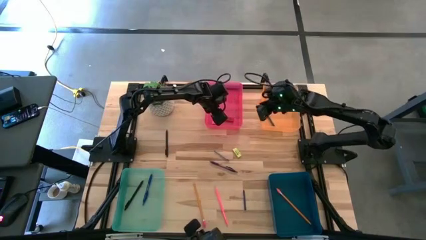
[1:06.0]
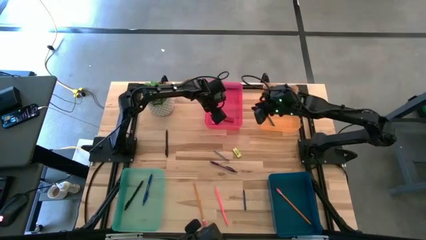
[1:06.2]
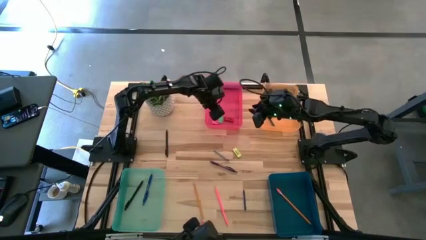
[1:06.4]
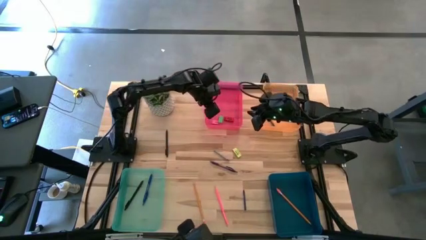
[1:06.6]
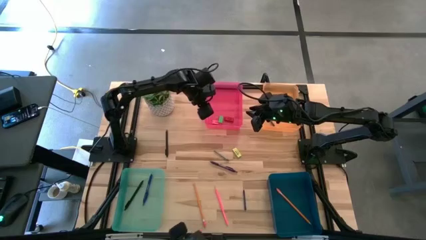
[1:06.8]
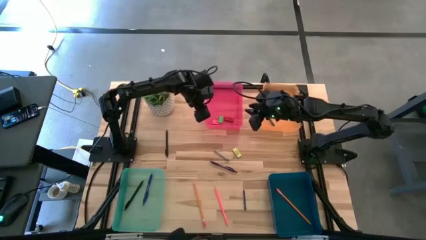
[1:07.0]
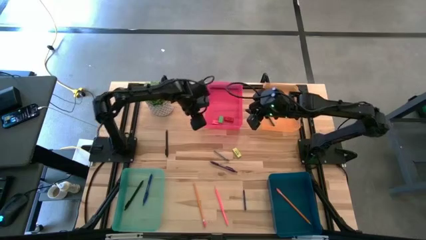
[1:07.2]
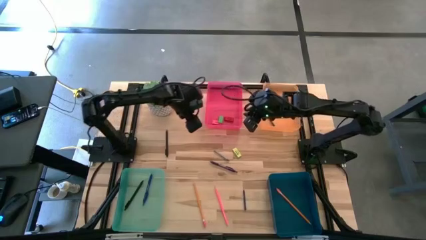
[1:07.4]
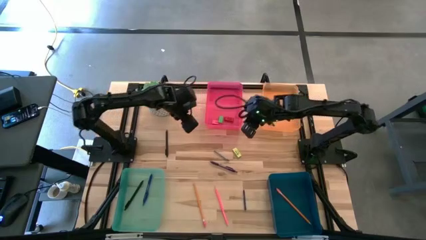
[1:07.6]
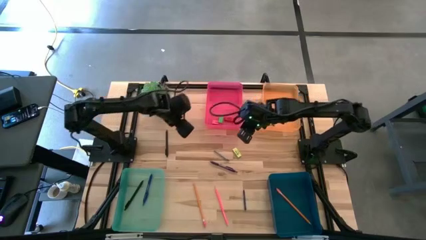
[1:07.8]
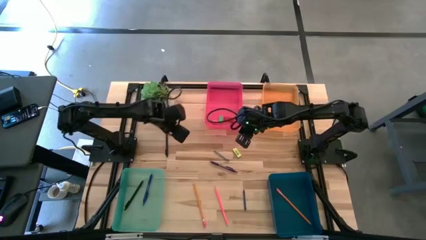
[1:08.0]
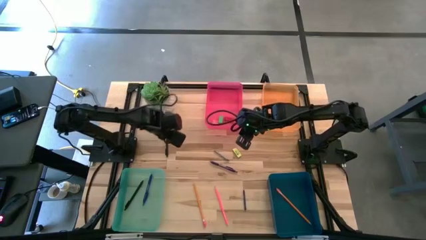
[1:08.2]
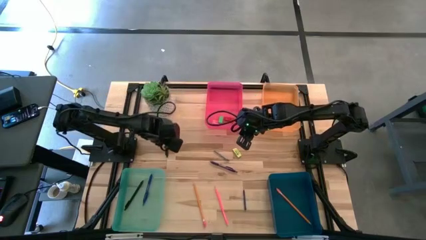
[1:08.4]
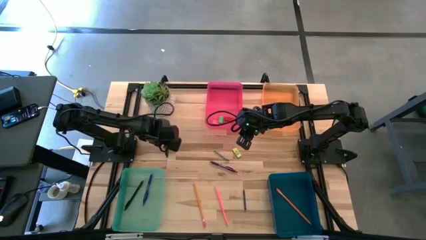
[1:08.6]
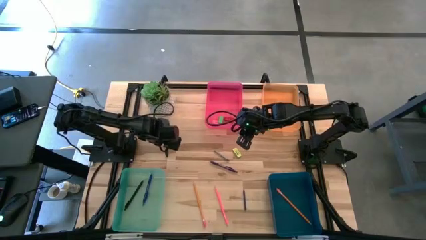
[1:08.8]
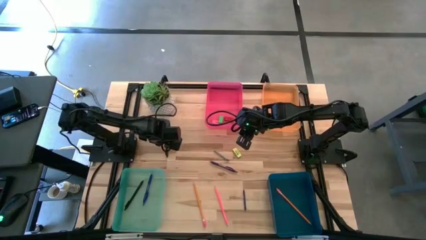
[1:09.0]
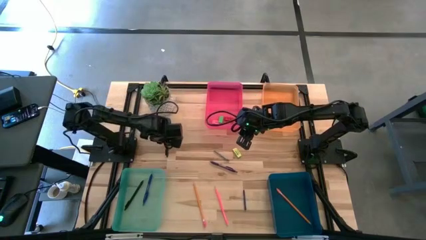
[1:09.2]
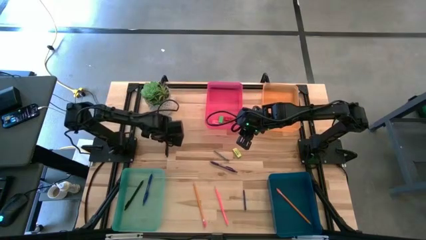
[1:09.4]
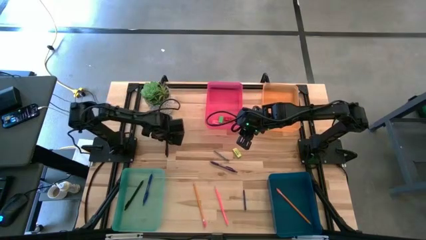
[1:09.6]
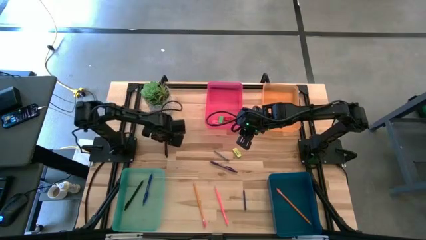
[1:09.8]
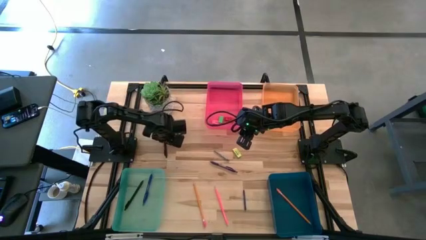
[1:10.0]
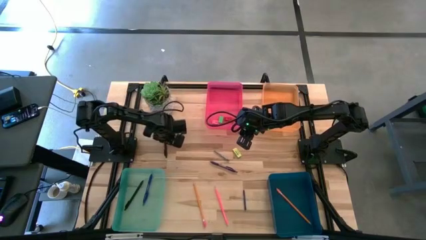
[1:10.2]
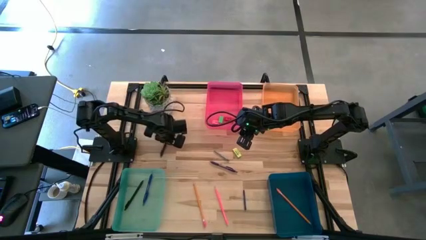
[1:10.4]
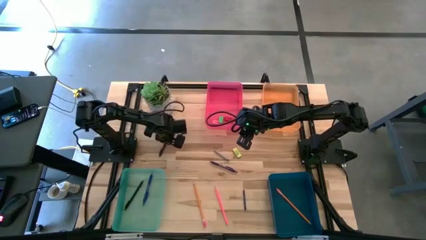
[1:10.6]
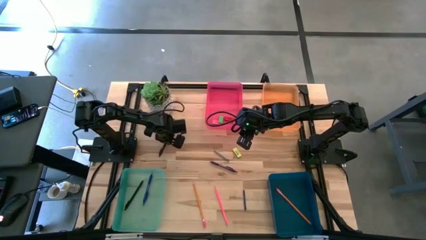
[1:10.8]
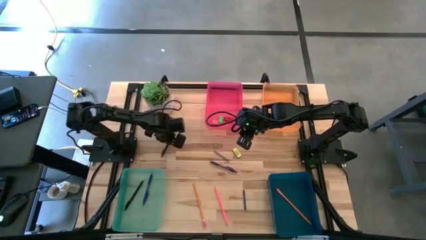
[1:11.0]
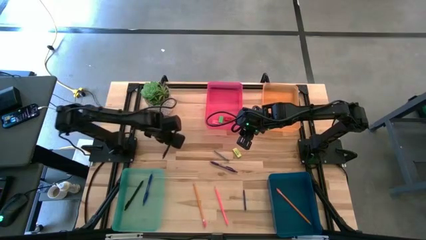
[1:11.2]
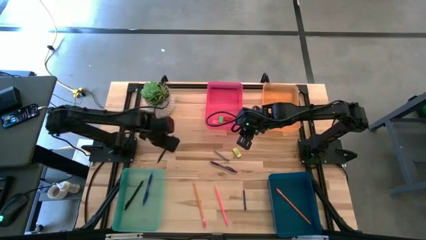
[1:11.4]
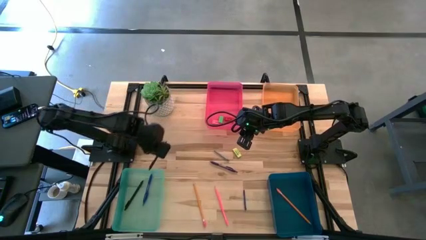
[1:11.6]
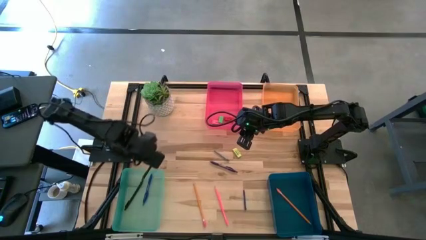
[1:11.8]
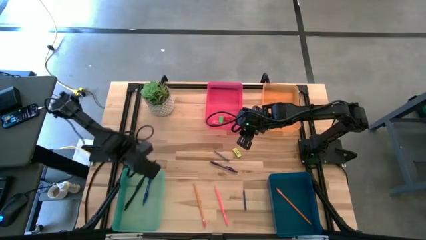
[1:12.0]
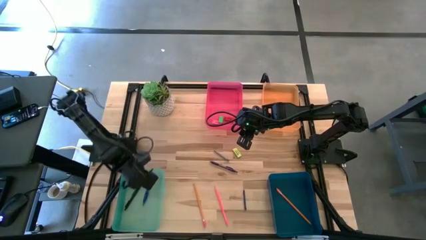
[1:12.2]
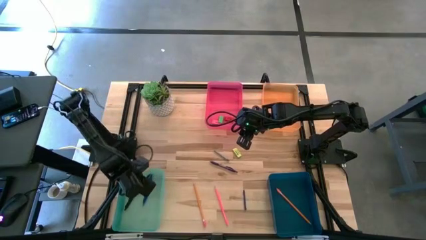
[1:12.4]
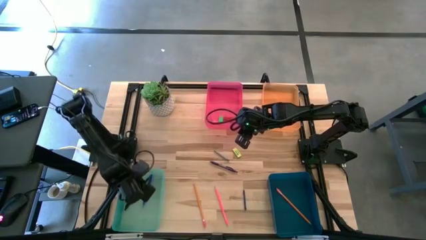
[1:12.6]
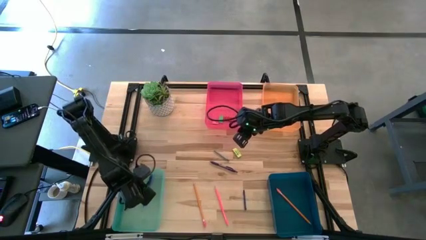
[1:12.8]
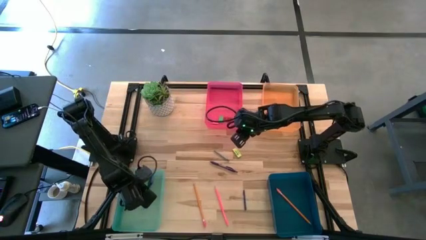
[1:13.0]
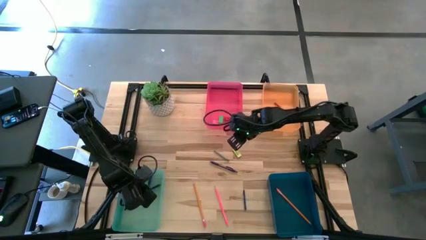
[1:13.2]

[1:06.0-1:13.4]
Task: Sort crayons/erasers/pens/pencils in bins
Put the black ballpen into the green bin

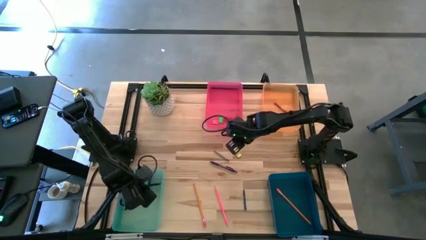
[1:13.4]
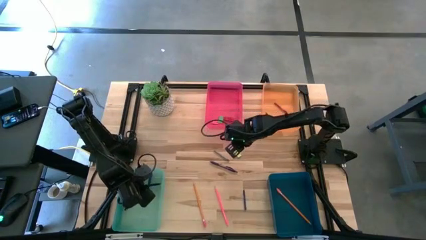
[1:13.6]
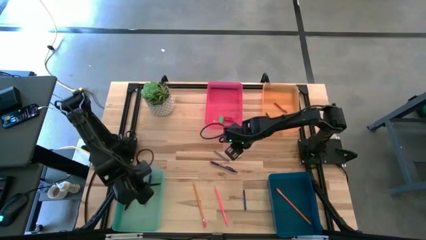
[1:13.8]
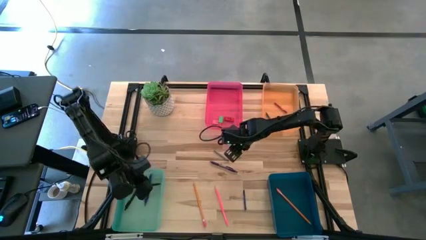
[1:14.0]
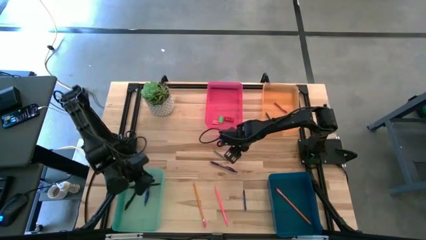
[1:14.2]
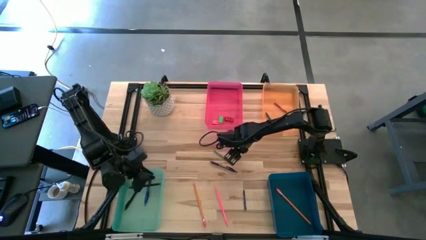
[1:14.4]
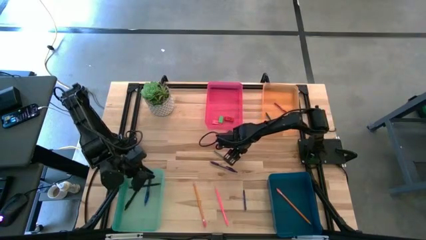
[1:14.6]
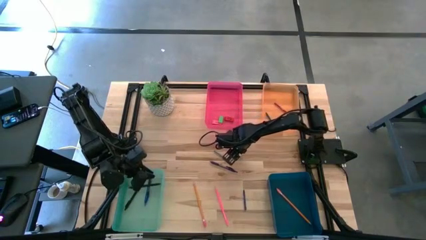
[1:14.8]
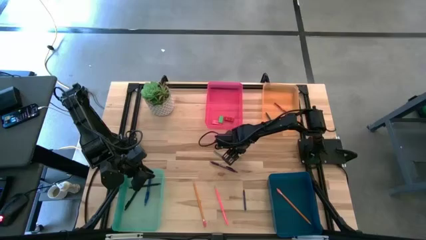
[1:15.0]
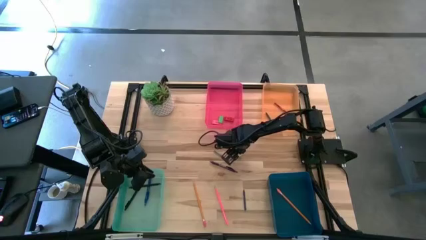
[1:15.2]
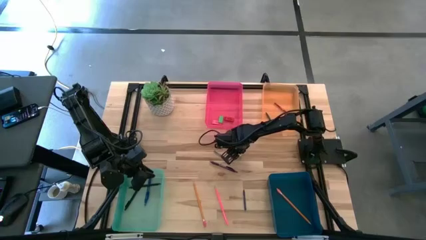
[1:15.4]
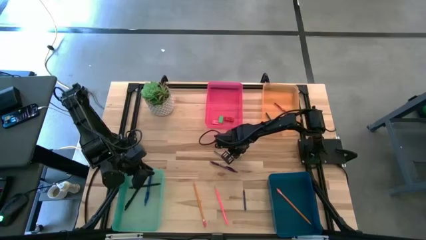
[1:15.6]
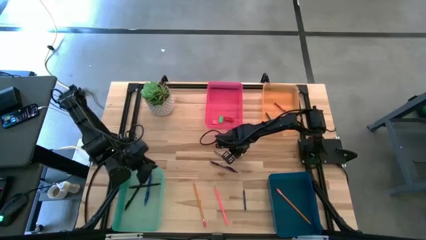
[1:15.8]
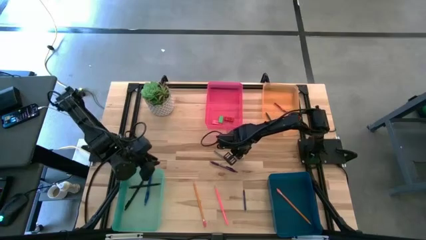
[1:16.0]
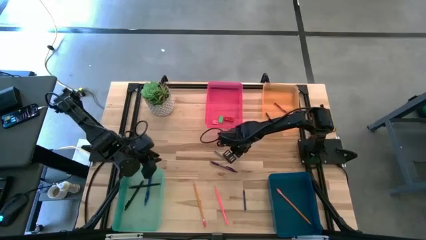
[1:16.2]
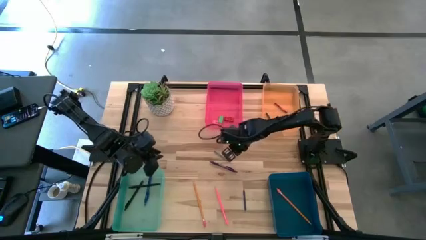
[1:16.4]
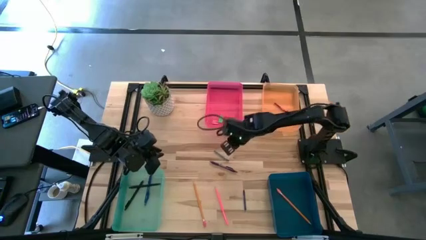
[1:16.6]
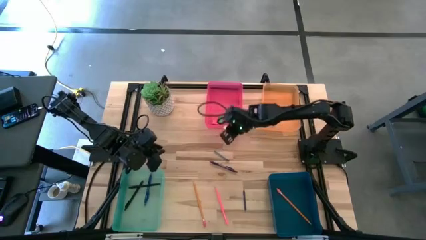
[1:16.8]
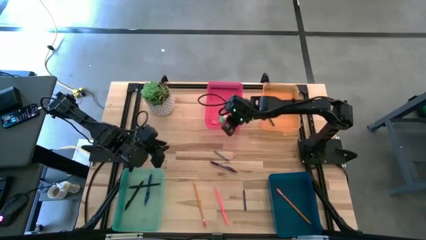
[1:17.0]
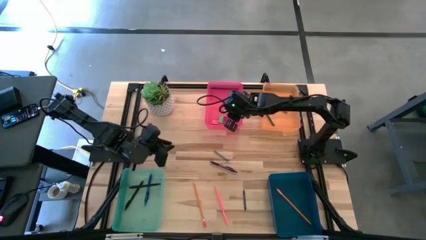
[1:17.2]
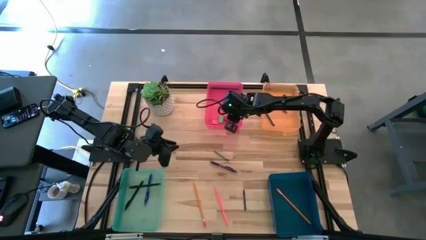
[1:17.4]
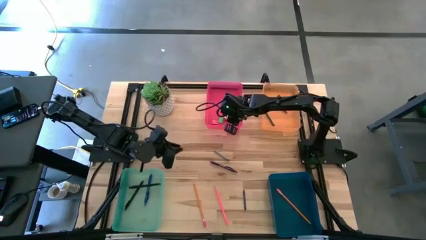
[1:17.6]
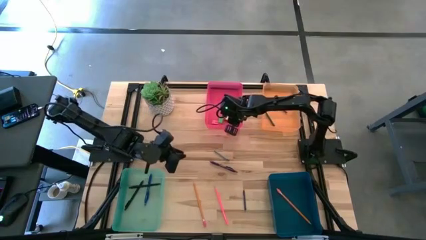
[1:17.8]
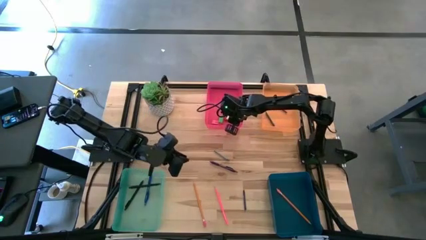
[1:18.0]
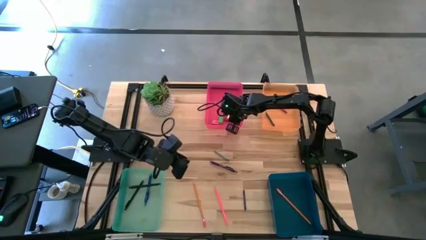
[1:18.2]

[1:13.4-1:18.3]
Put the light green eraser into the pink bin

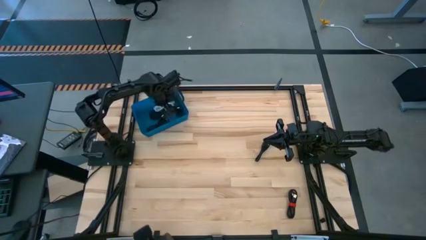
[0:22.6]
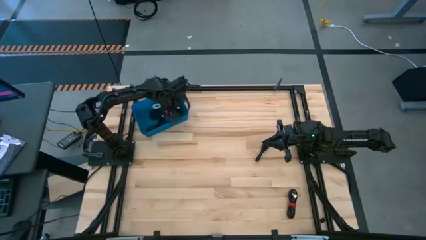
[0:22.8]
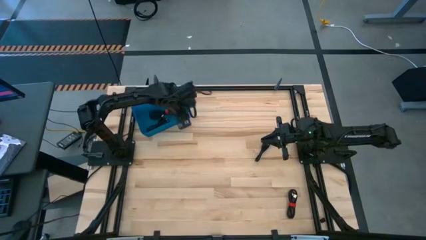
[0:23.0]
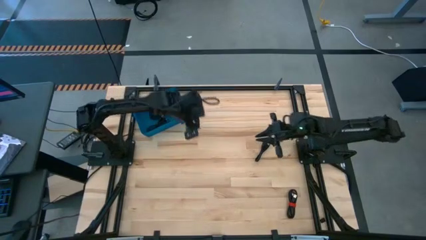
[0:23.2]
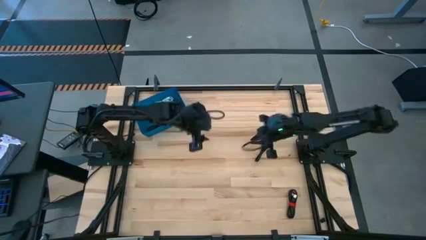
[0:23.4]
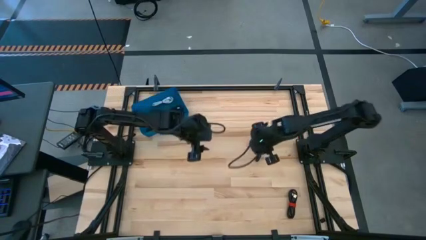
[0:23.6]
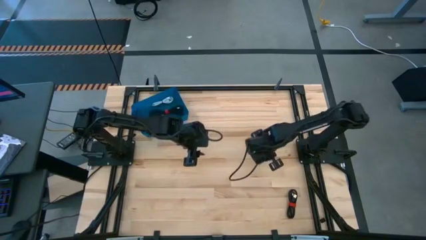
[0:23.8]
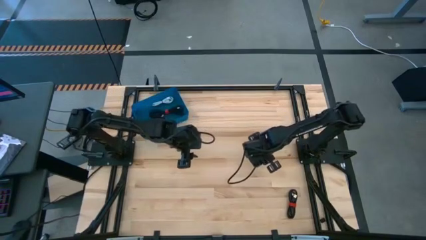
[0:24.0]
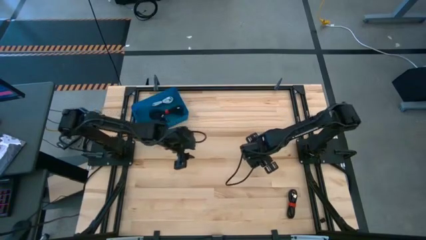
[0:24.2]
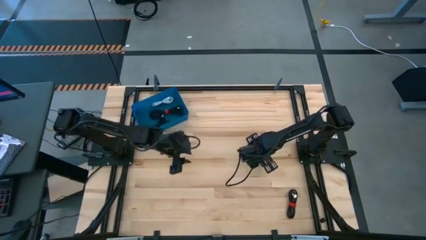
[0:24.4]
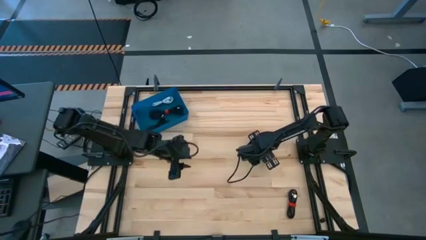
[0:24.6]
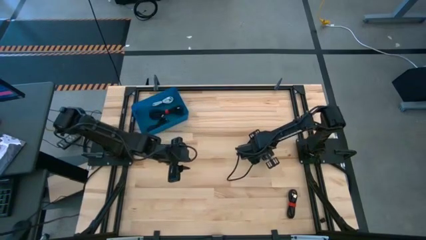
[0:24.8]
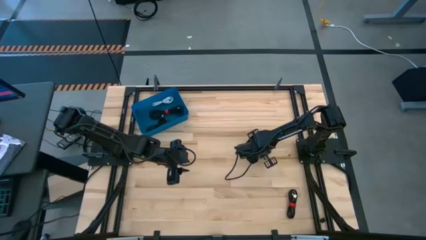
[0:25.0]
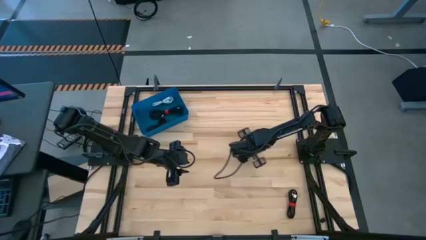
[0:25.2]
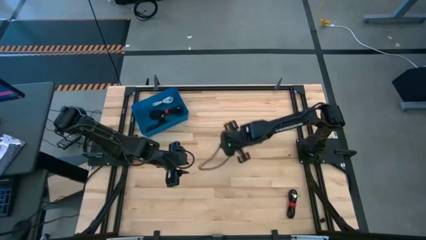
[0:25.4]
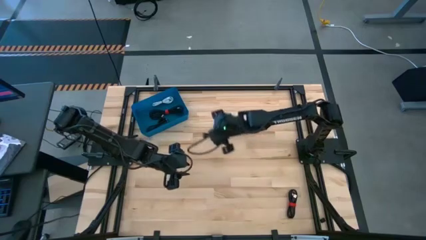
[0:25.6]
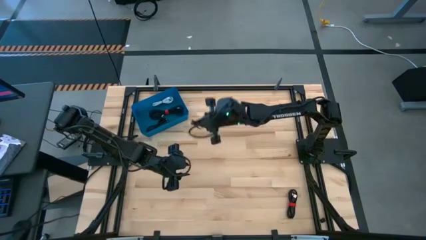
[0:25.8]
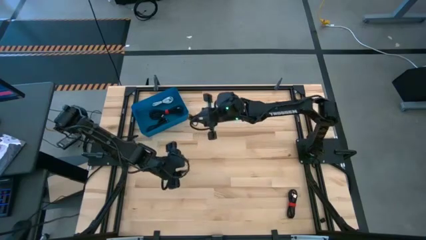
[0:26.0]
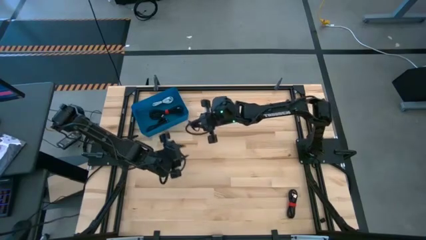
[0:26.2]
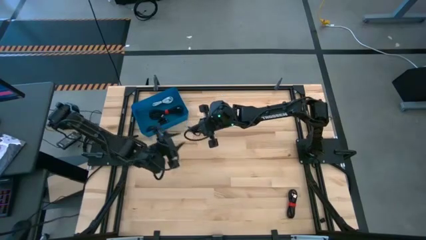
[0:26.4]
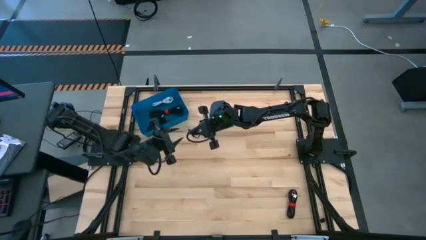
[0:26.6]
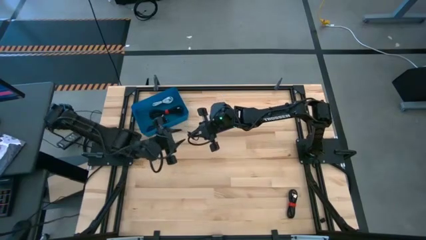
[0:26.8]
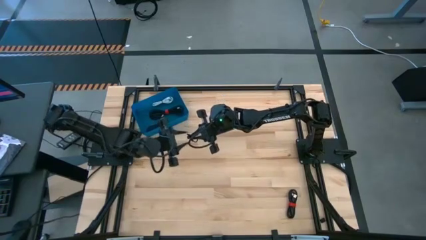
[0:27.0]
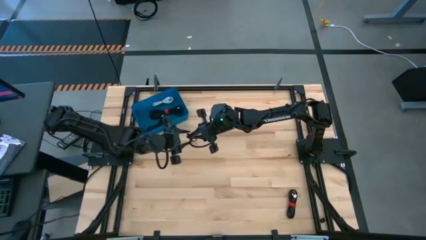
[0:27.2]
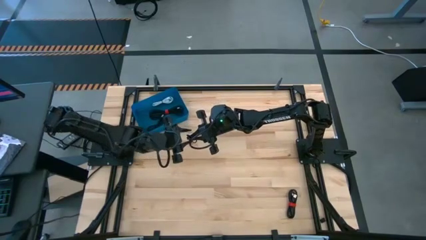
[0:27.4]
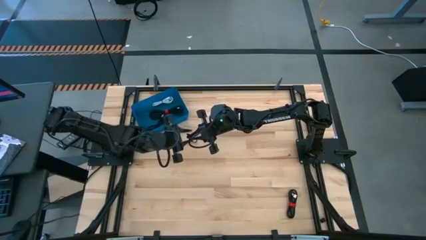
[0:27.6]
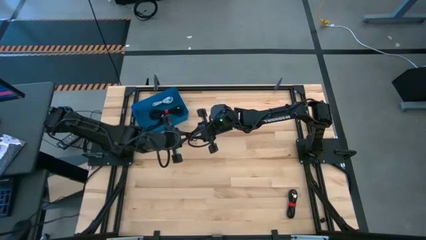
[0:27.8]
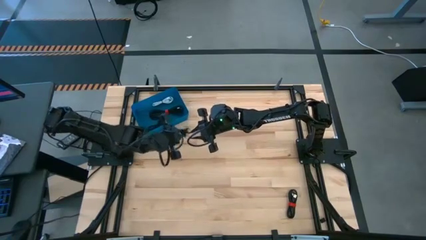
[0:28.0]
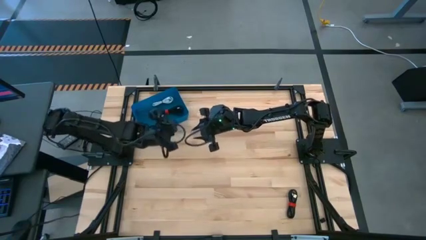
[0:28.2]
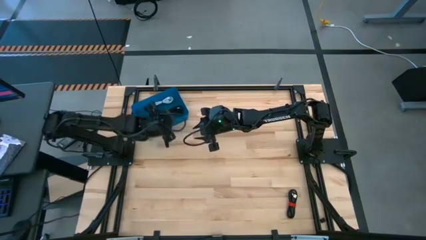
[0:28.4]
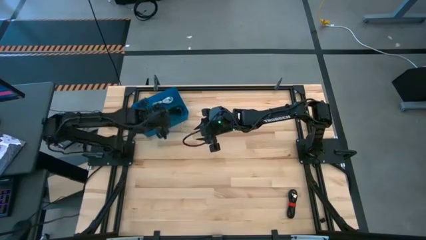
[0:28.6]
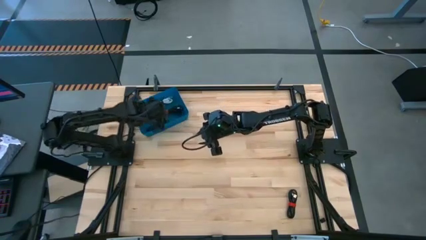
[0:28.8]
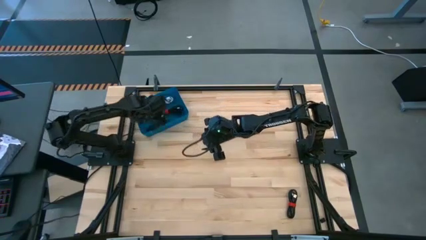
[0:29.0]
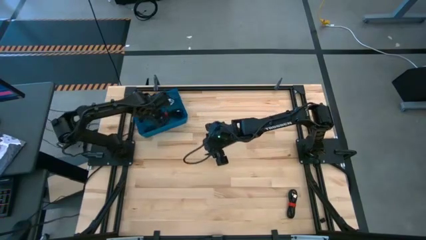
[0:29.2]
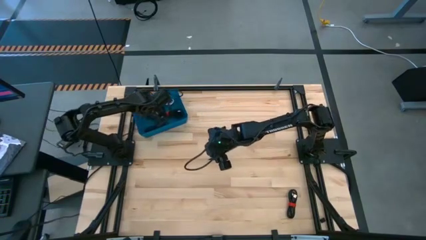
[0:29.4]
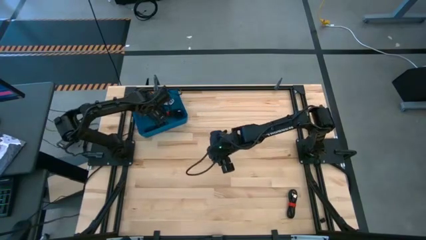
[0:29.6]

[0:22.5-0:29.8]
Task: Pick and place USB-C Cables
Put the black charger cable into the blue bin
